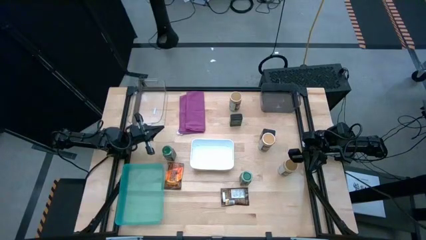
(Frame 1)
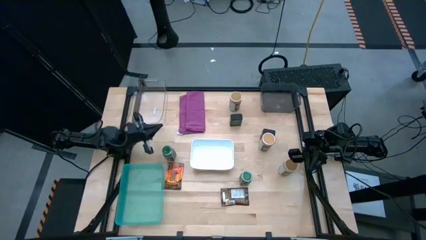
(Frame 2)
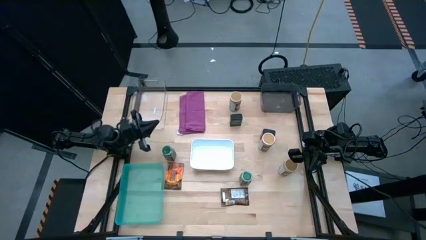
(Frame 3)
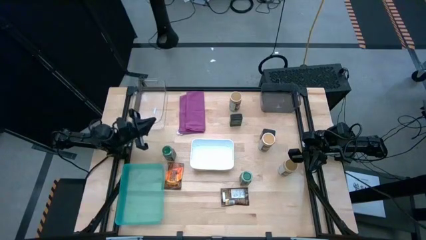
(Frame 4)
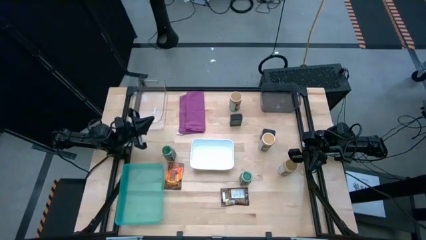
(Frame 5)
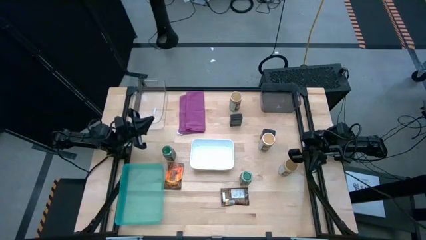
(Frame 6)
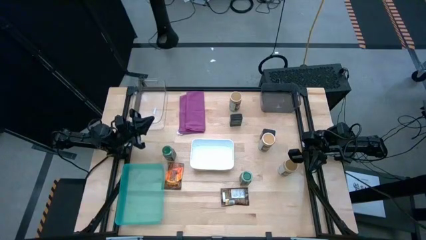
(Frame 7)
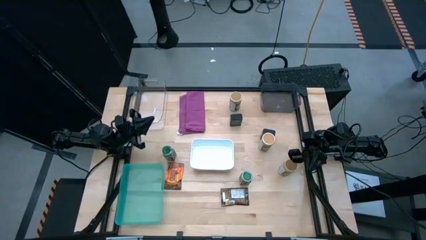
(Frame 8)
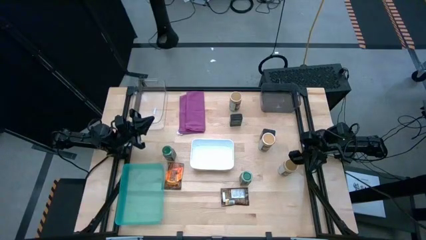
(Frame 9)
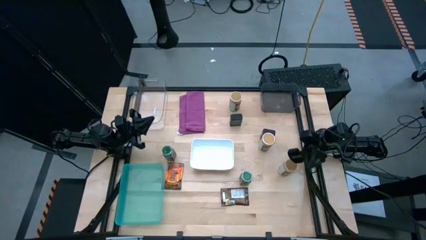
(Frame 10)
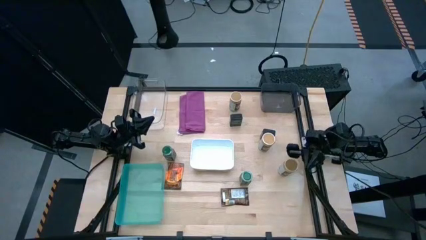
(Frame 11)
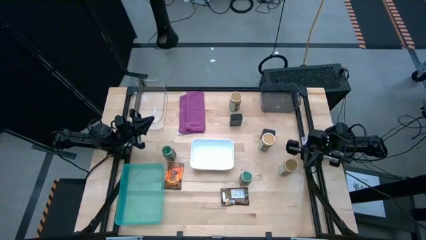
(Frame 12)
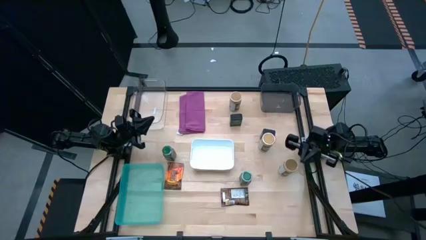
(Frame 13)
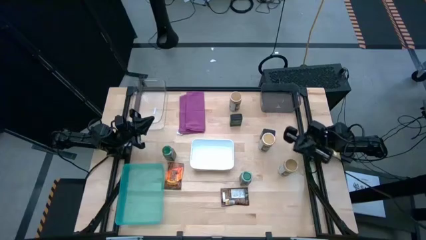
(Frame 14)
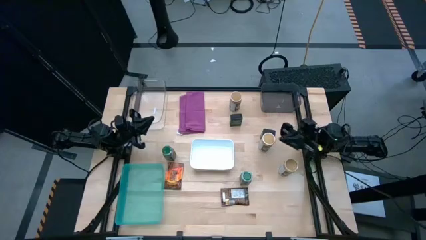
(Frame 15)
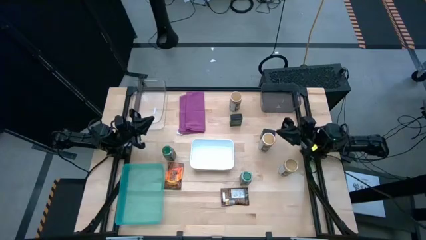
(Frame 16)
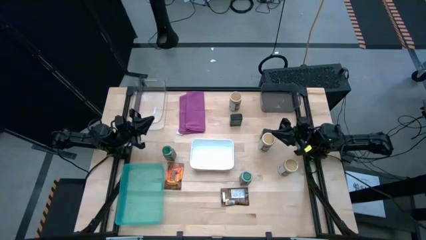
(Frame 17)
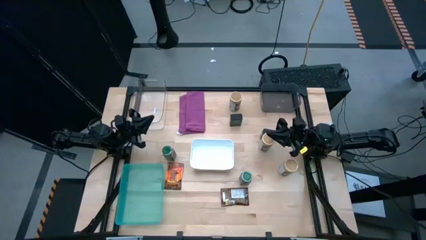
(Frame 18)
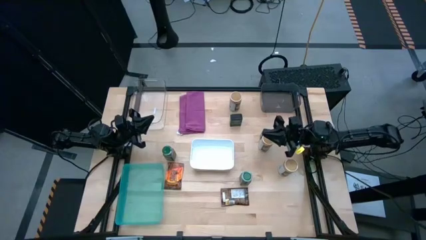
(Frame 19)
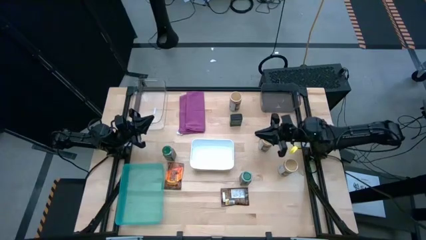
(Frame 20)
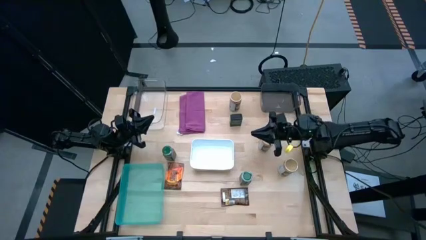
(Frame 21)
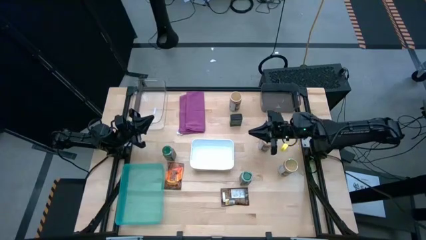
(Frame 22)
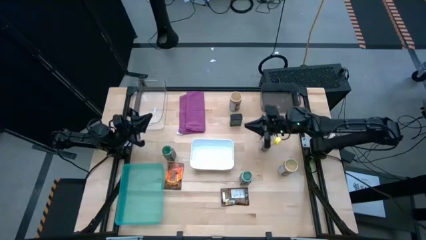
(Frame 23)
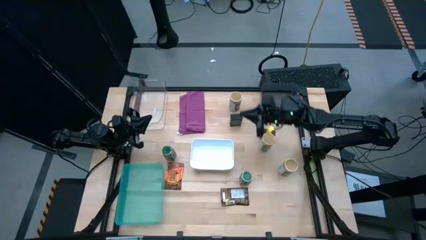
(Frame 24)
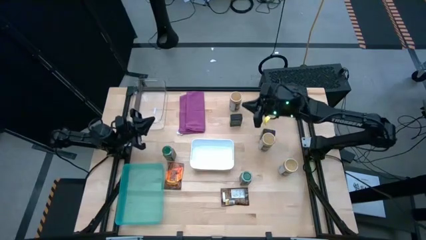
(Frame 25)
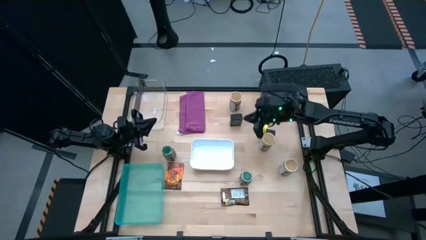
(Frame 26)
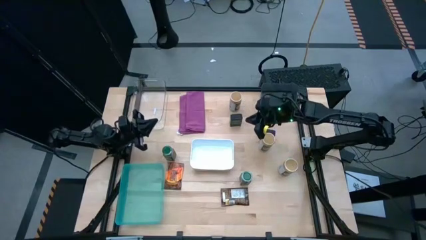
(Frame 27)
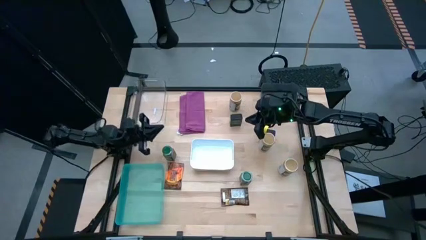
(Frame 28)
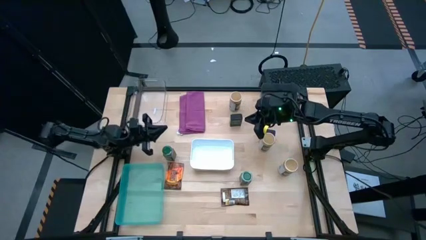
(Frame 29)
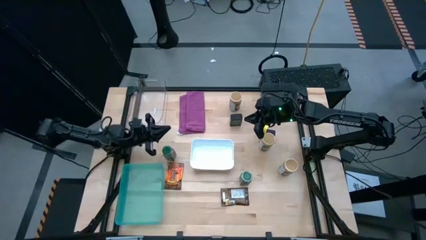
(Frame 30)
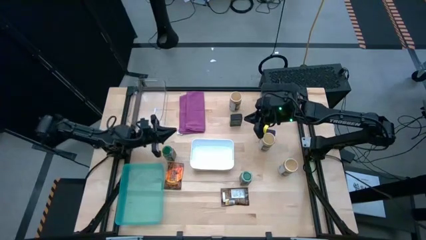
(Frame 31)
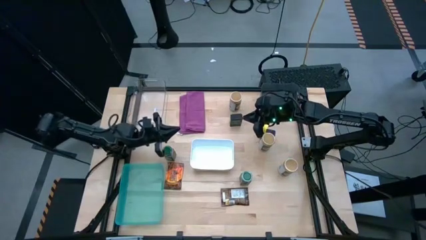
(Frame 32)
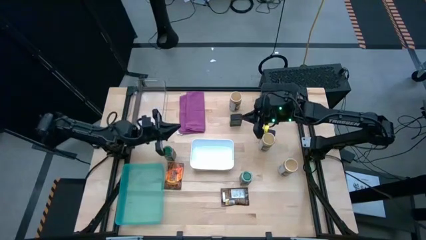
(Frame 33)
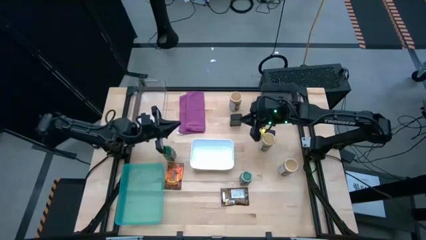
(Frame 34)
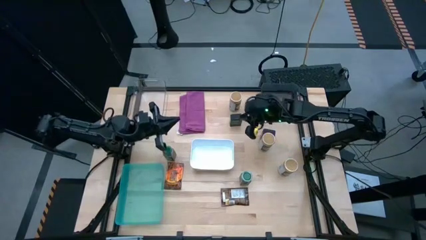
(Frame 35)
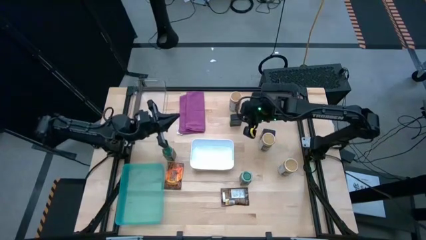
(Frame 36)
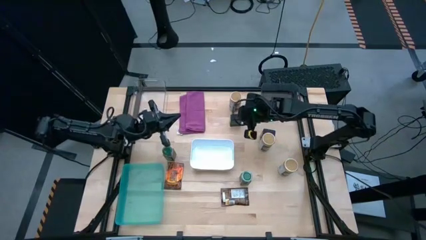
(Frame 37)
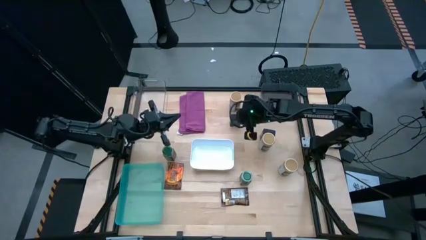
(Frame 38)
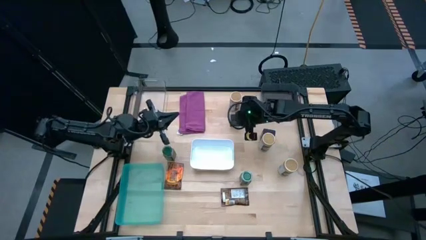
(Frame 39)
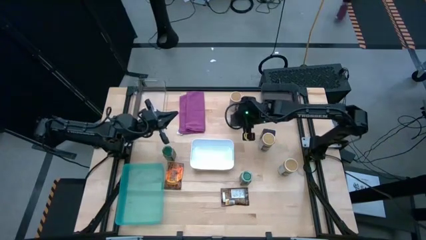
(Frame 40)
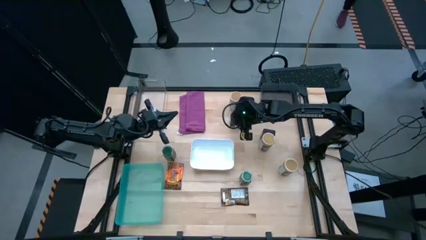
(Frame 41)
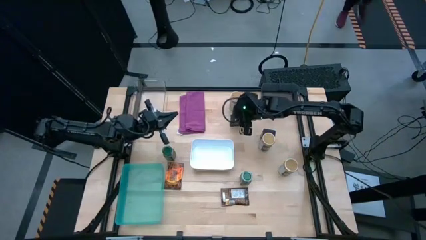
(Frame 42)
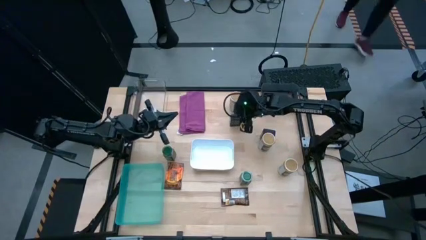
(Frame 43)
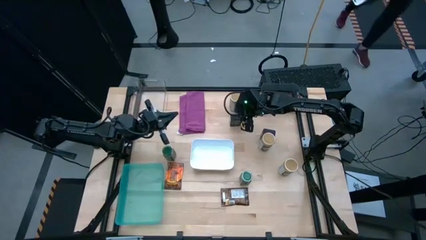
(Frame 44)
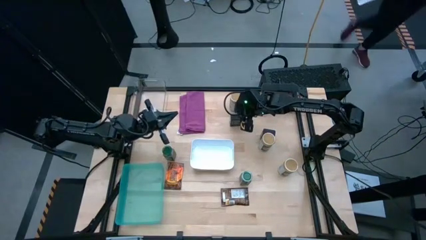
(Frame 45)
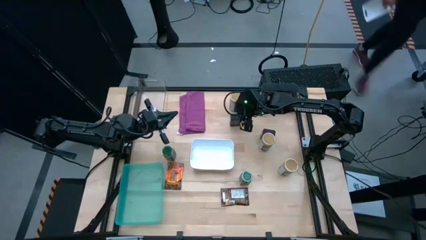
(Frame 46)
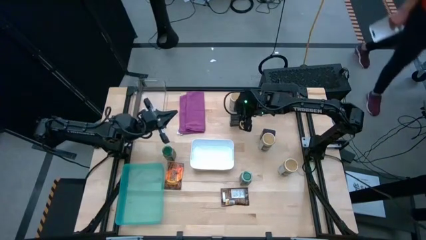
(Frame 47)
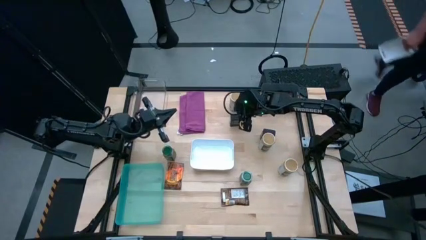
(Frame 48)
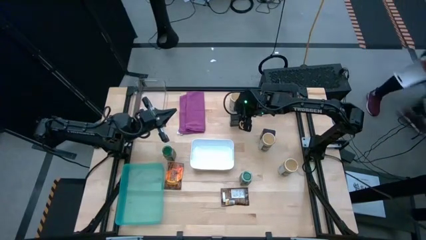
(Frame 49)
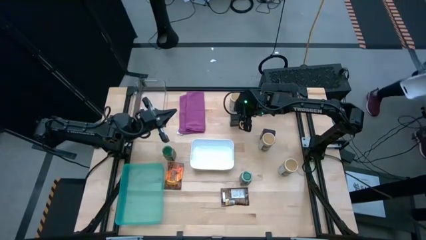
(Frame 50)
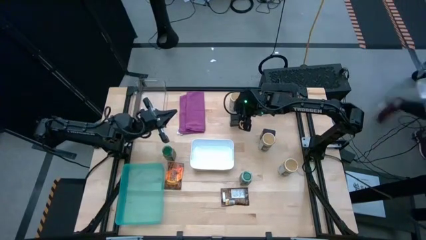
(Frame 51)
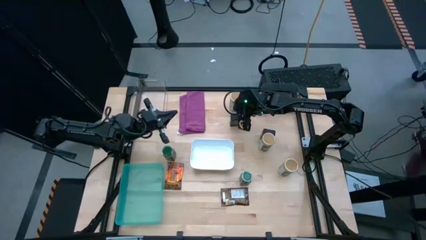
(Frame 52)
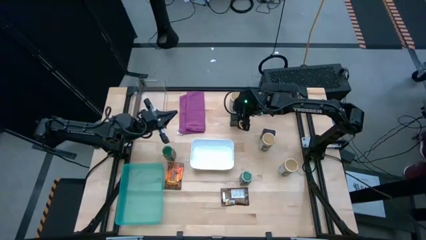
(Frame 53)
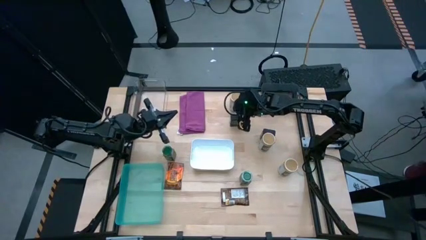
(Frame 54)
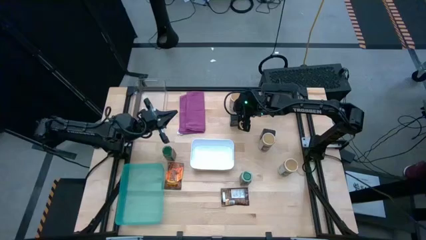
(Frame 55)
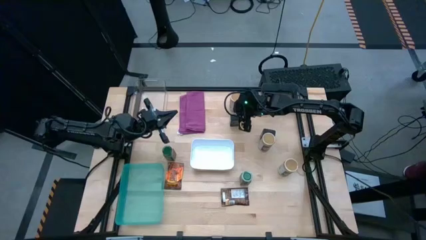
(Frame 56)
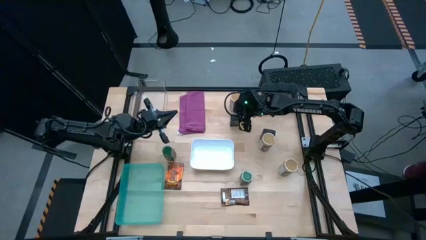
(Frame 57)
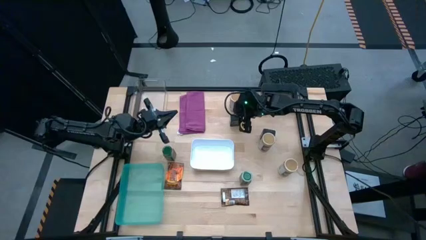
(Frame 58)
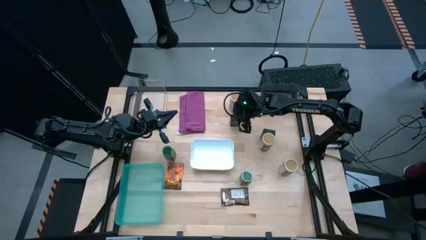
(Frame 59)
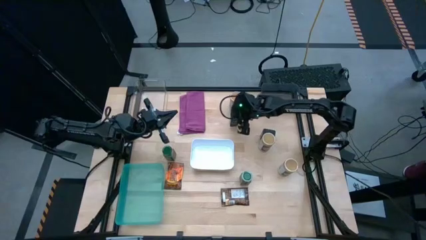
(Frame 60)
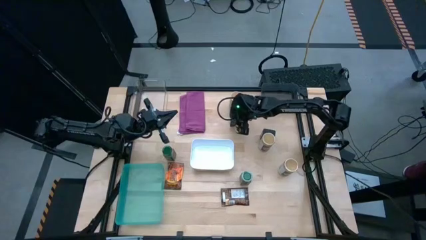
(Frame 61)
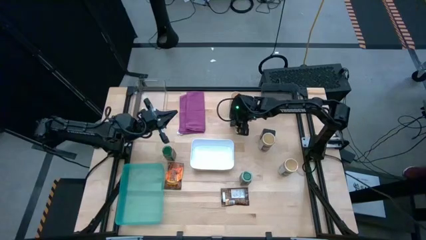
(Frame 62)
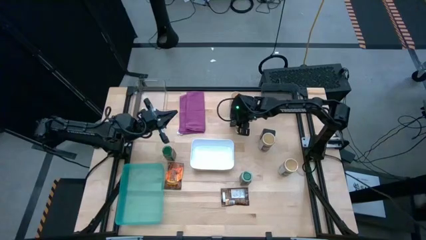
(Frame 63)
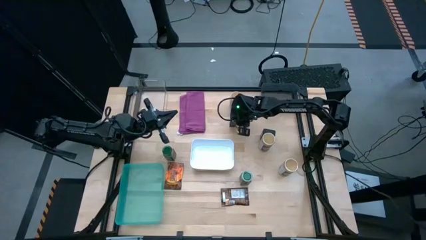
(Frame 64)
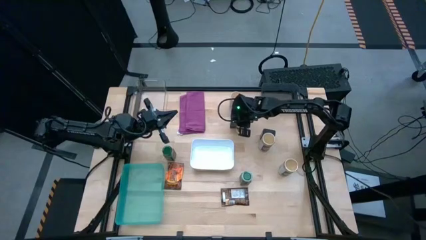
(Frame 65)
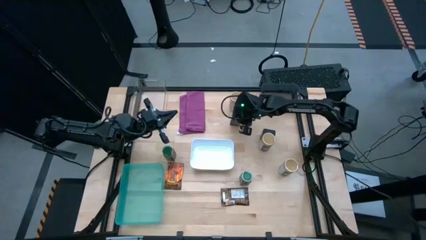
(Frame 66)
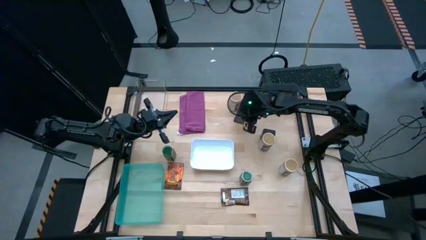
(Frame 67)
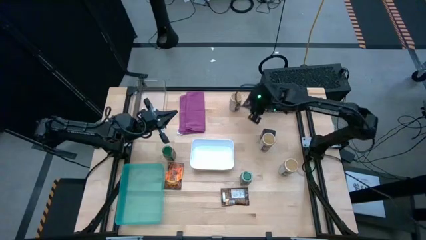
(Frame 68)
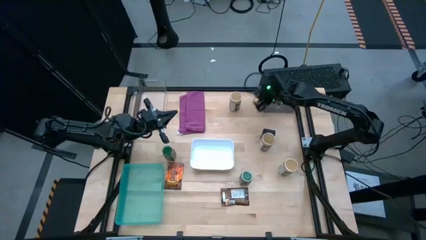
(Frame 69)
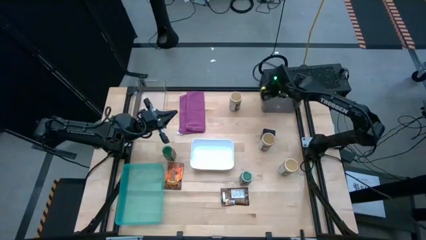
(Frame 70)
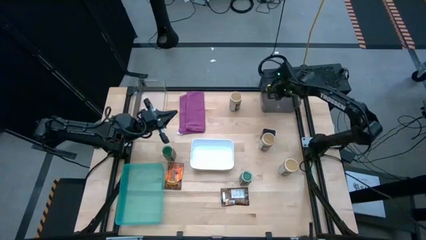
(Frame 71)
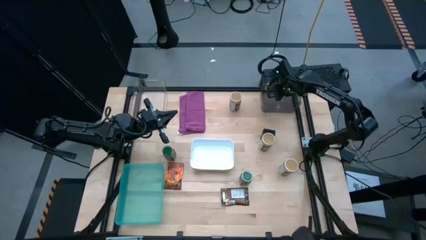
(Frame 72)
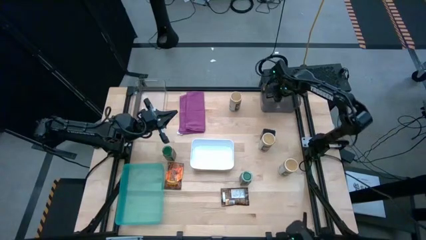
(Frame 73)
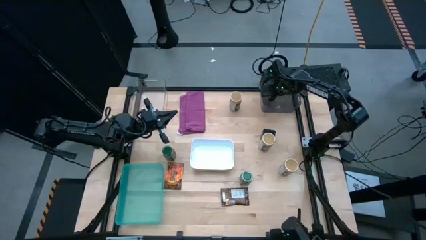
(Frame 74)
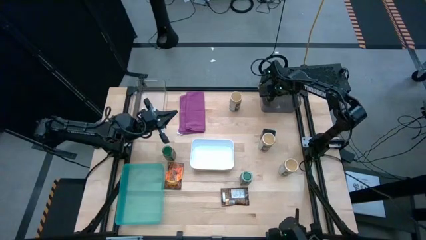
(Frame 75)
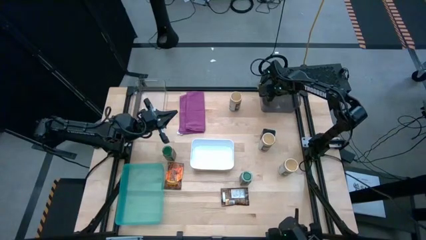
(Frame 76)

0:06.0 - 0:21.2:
Task: Sort spices by type
Put the top black seasoning can into the black bin
